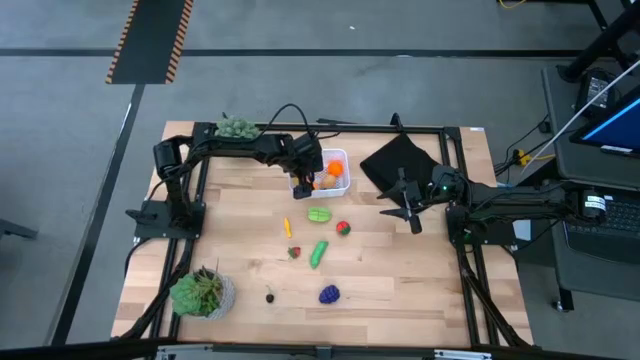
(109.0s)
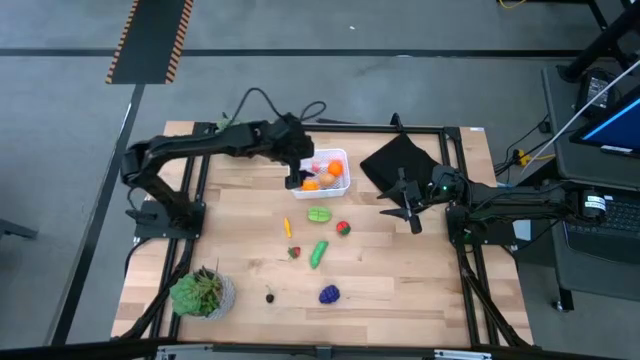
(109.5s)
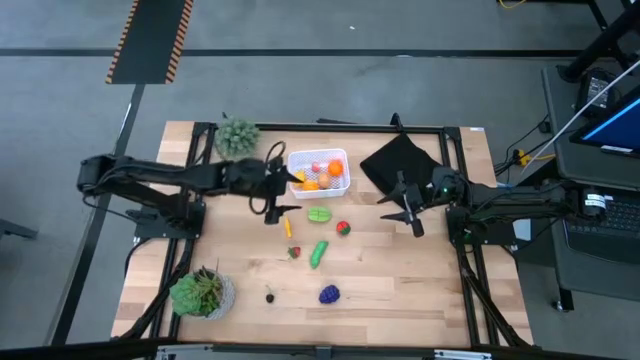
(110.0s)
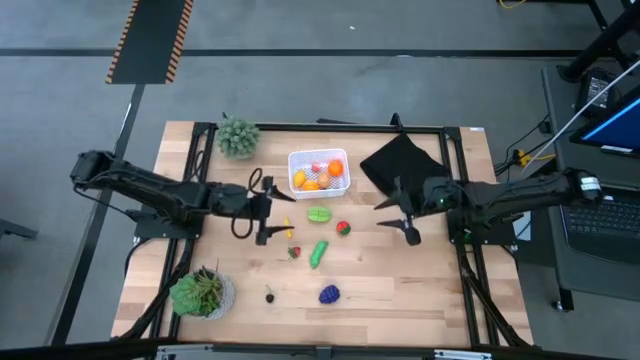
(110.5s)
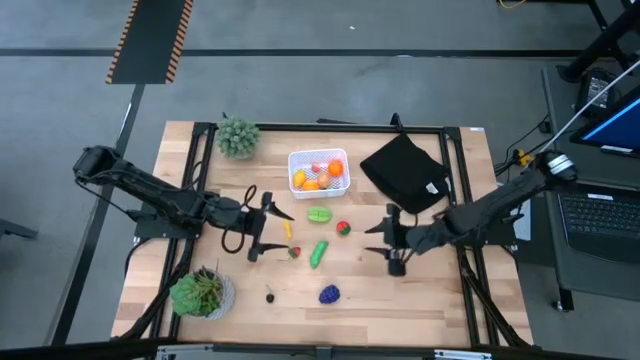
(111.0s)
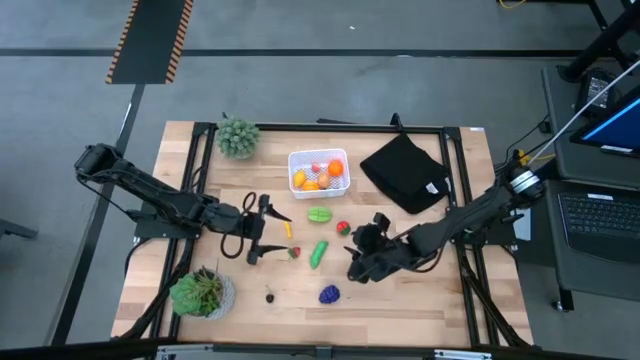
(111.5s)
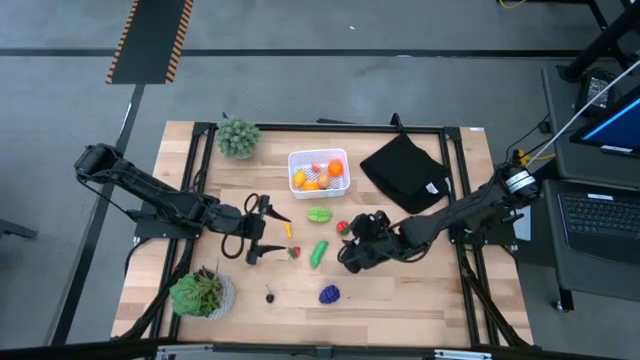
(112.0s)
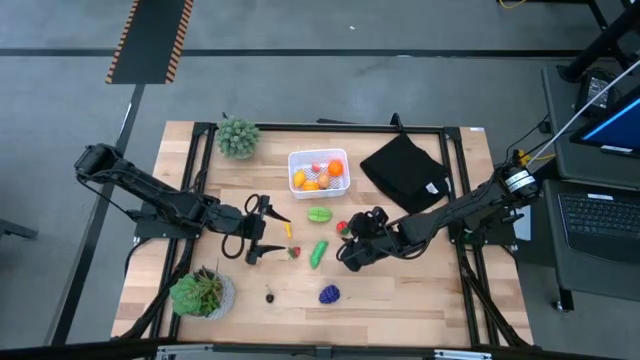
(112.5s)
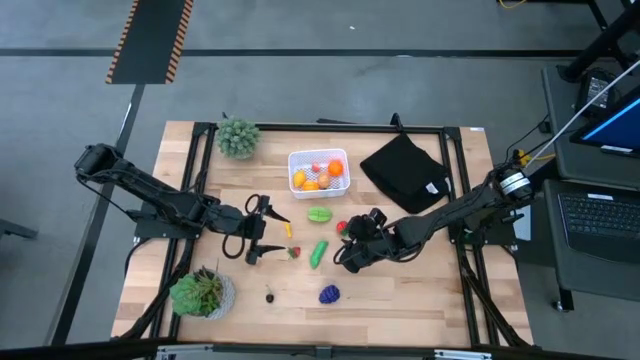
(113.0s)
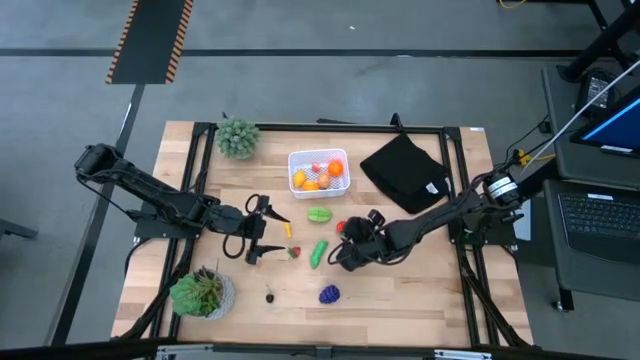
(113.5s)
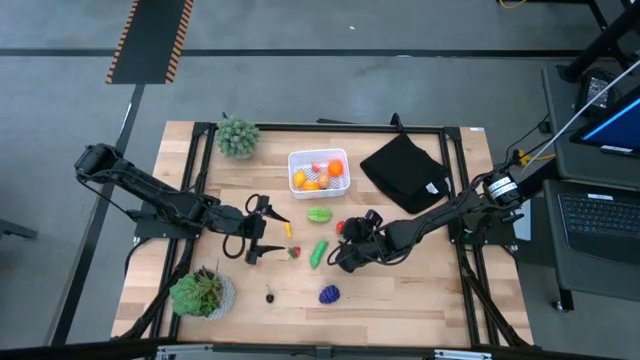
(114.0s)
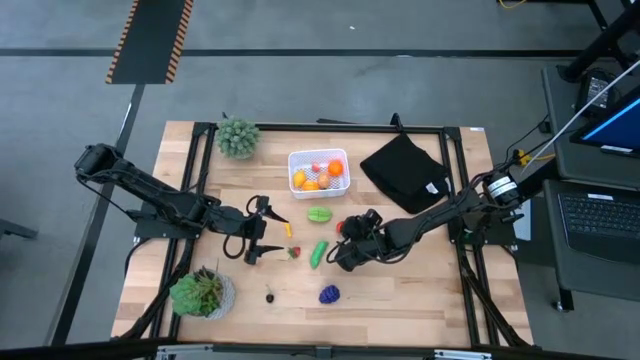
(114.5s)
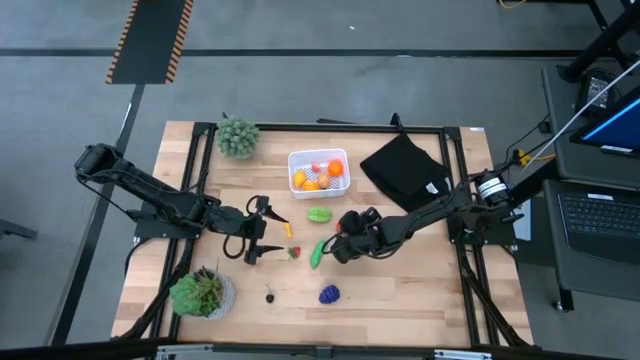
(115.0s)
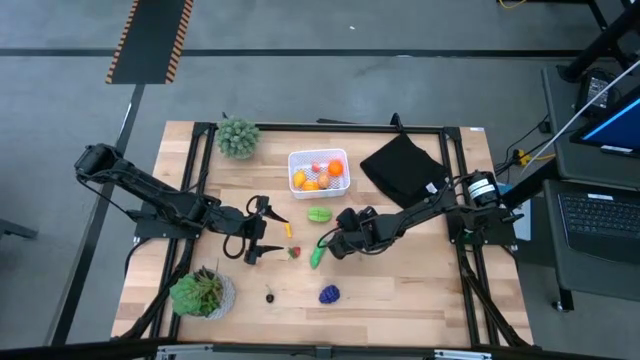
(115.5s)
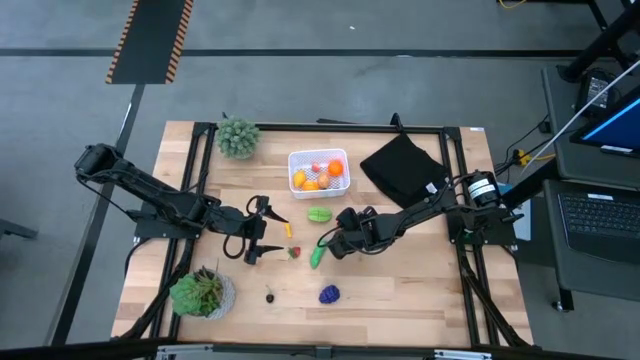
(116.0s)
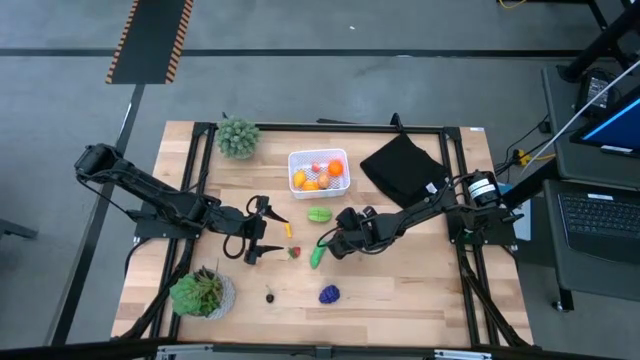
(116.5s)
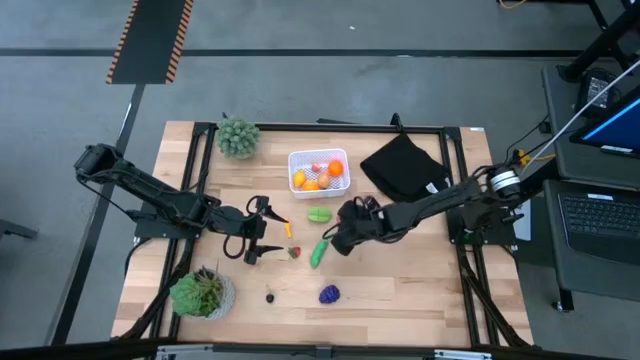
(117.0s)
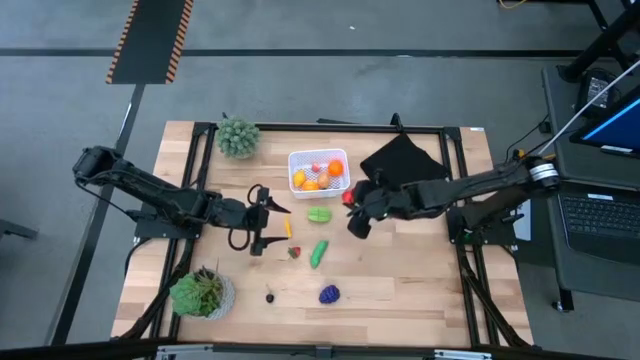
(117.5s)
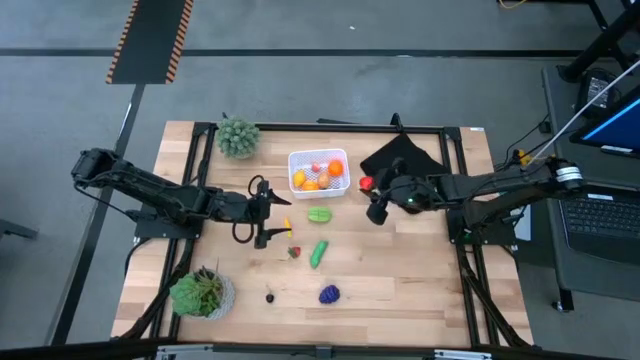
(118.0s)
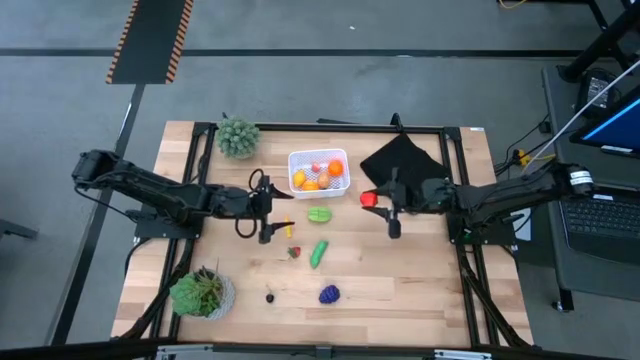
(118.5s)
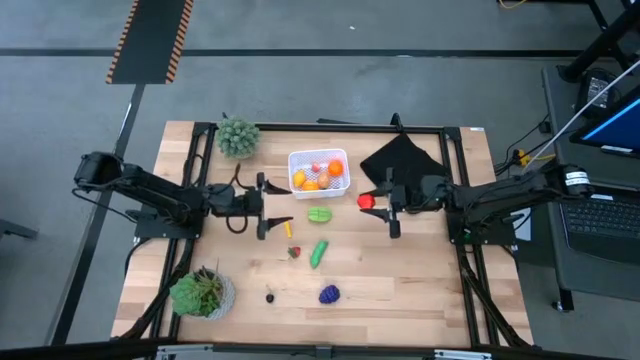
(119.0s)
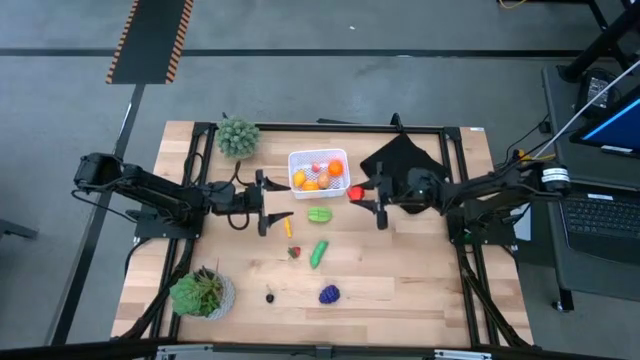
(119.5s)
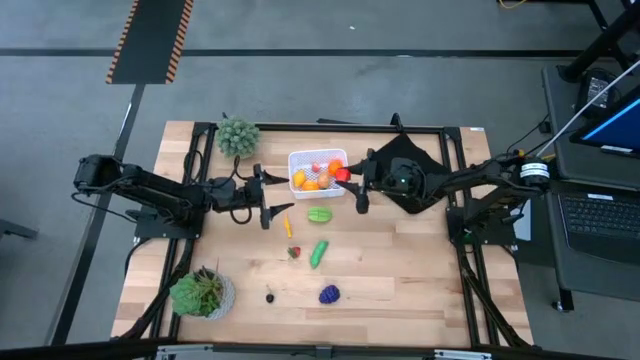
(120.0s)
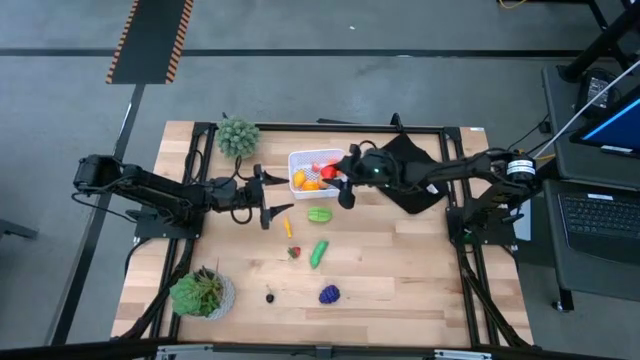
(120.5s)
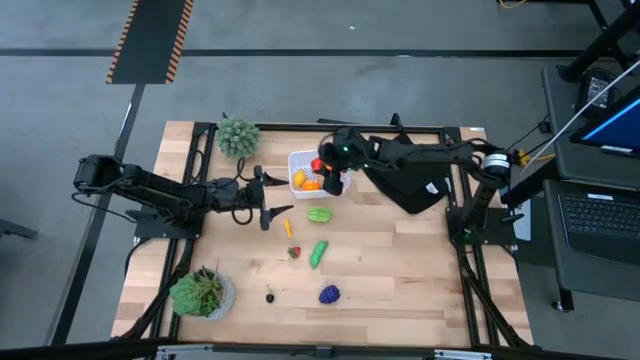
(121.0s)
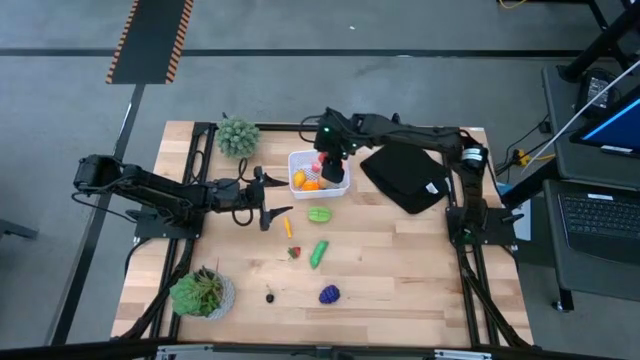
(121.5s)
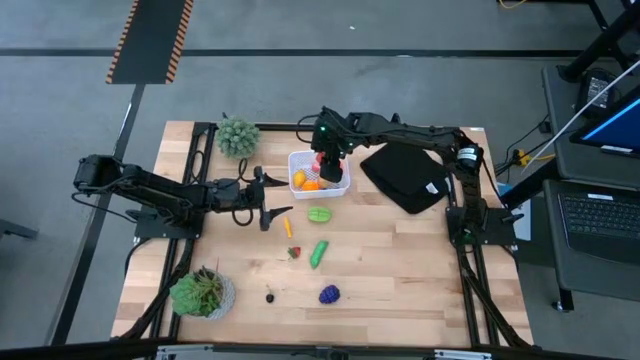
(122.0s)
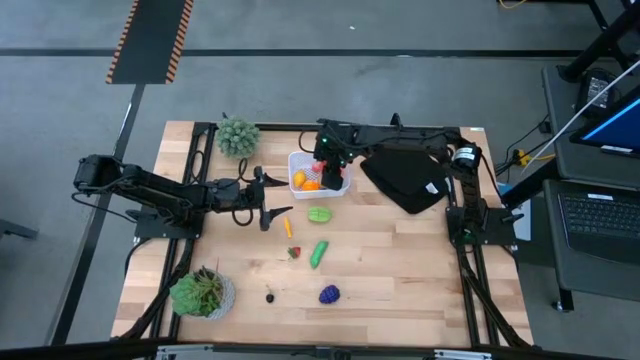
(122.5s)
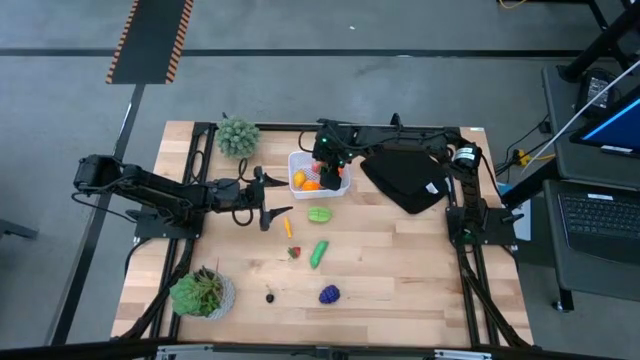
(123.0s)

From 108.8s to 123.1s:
Task: Pick and placing Produce into tupperware
Put the right strawberry into the white bin

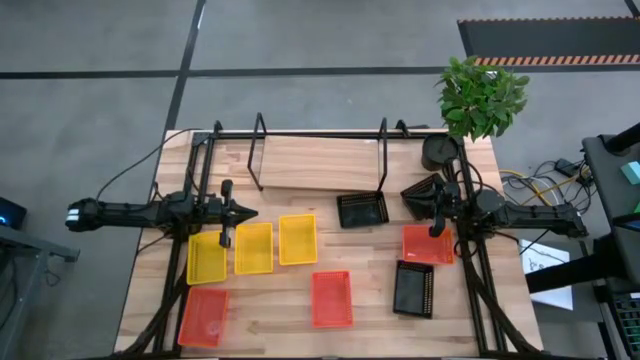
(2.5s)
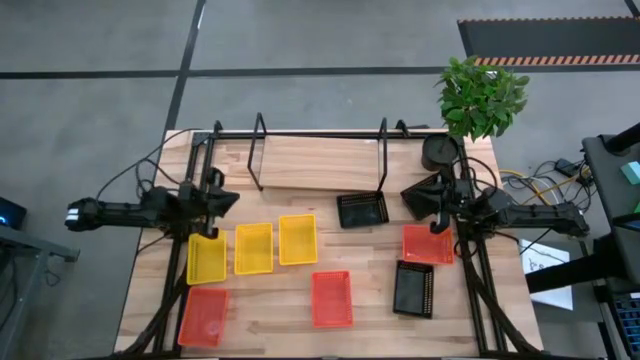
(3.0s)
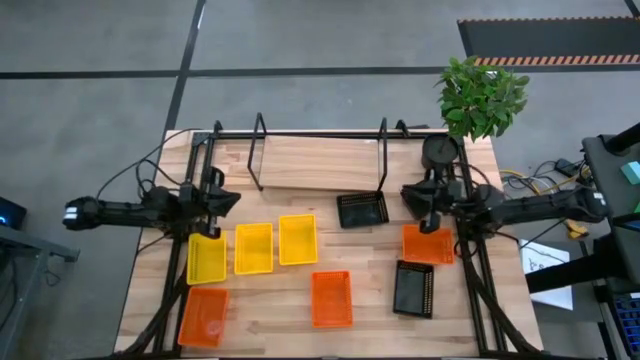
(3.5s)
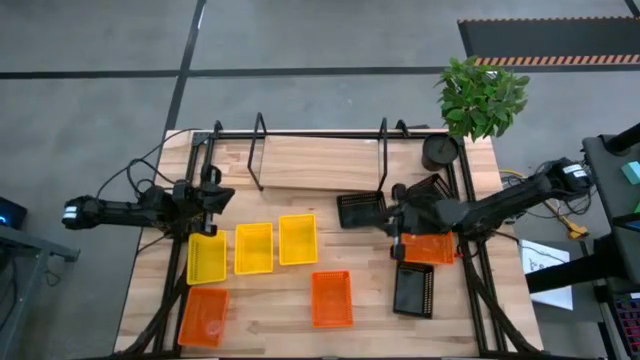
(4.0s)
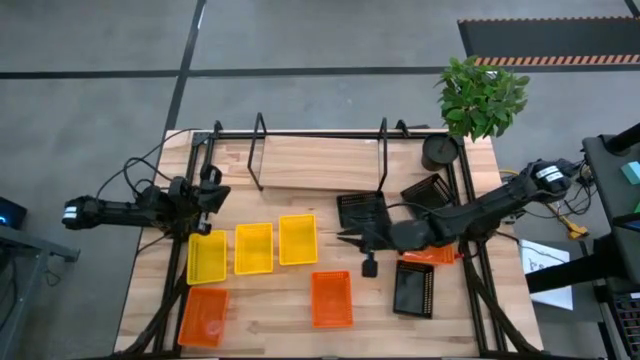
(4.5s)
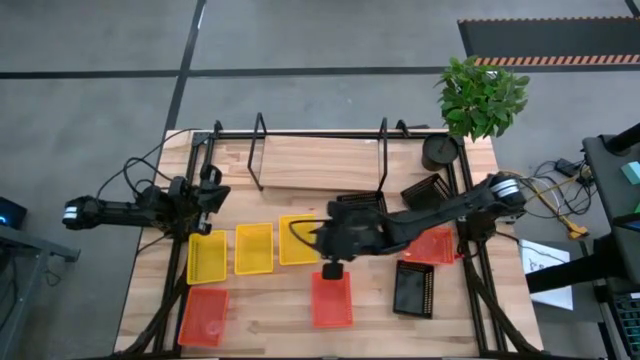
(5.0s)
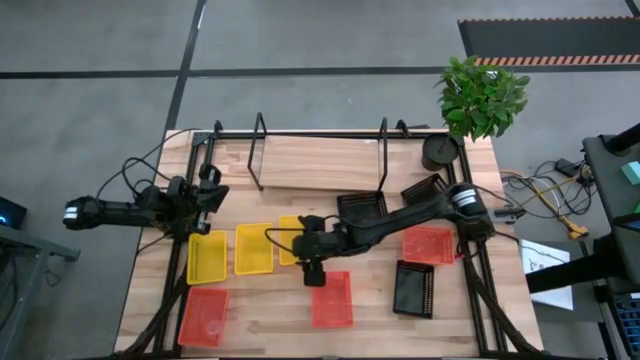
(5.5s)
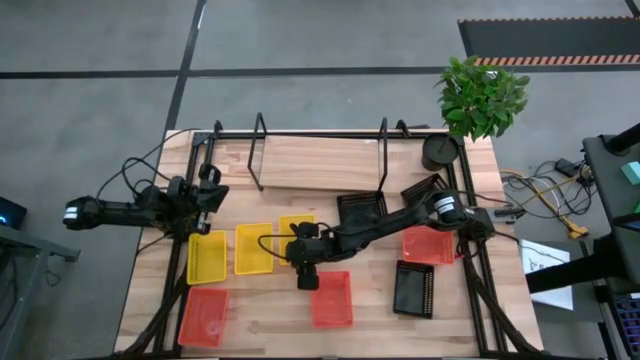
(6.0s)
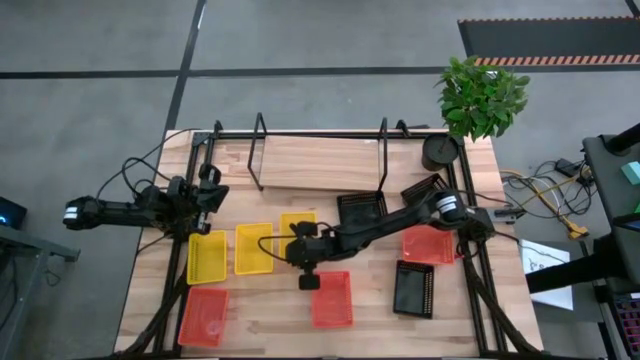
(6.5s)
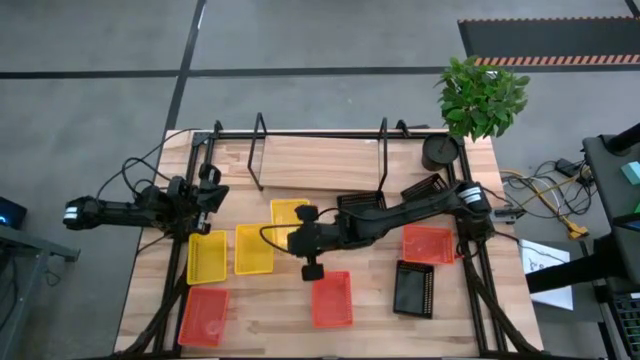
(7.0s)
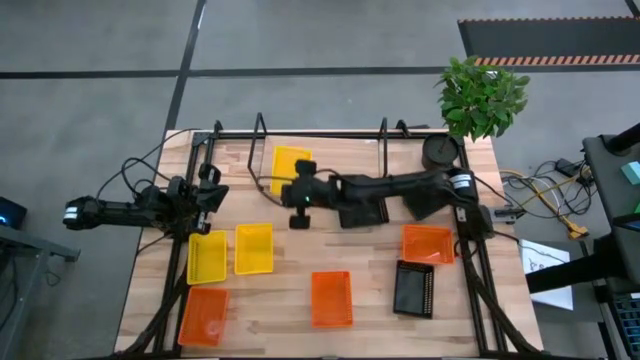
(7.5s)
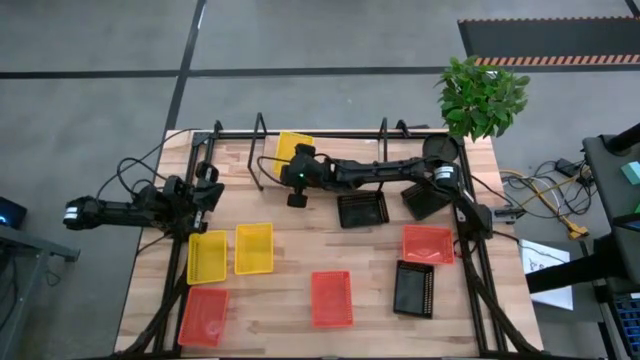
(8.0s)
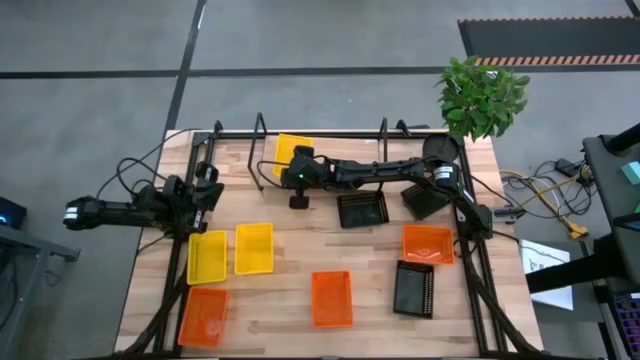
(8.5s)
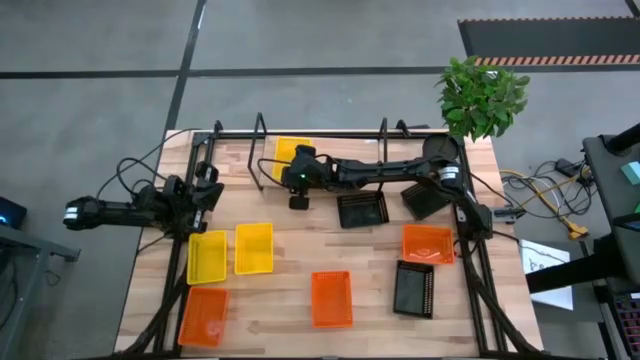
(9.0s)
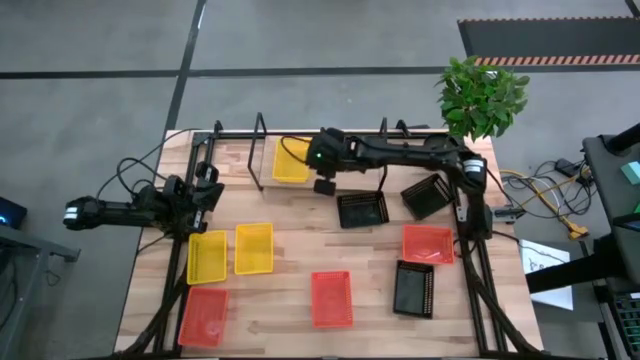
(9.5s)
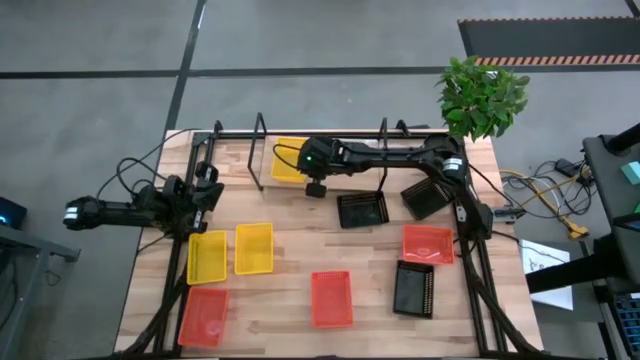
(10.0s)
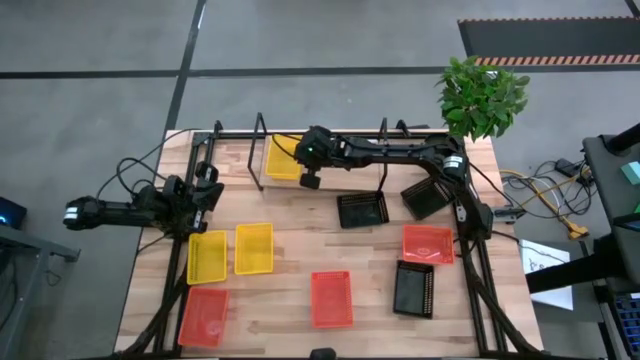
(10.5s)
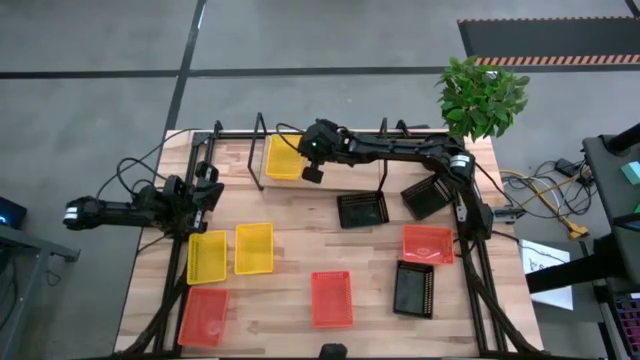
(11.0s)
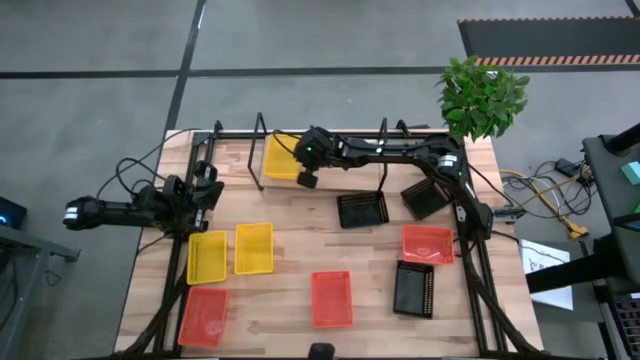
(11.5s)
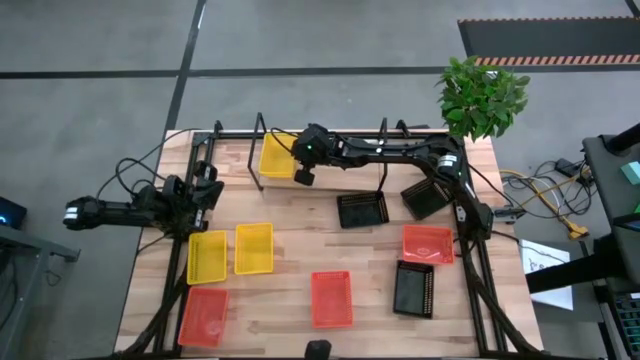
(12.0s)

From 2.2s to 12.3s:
Task: Stack baskets on shelf by color
Put the right yellow bin on the shelf
